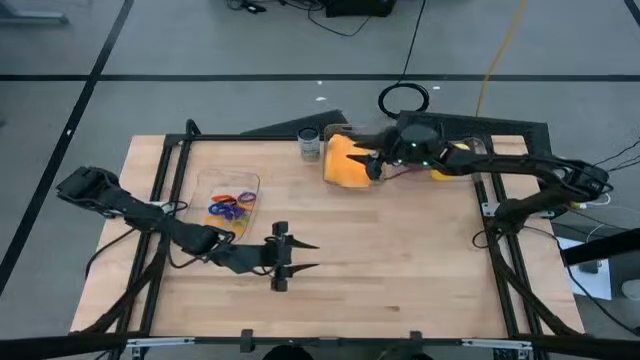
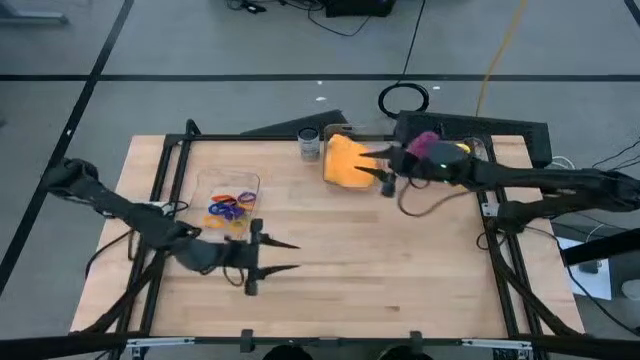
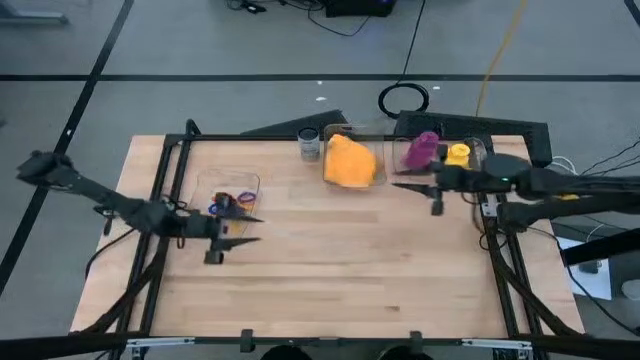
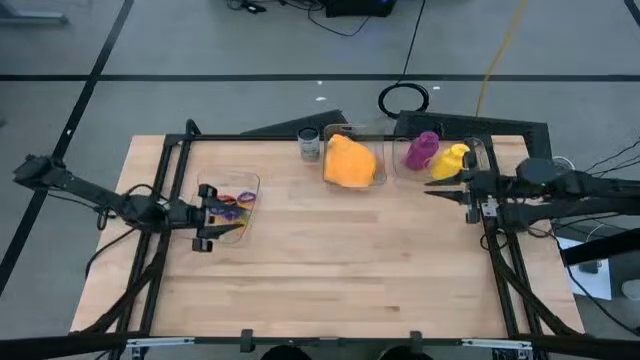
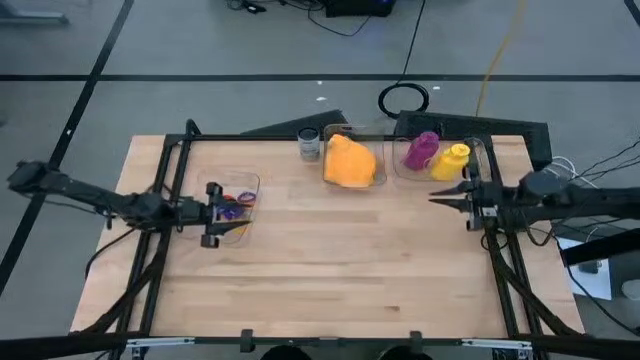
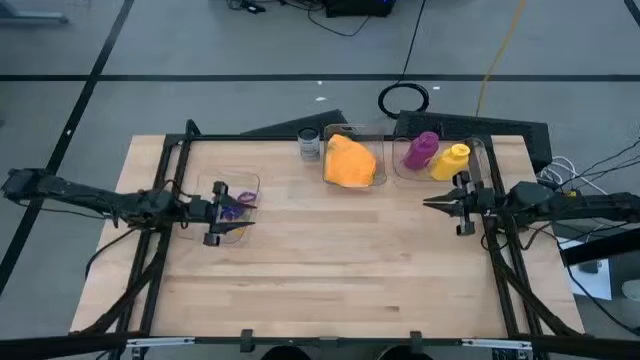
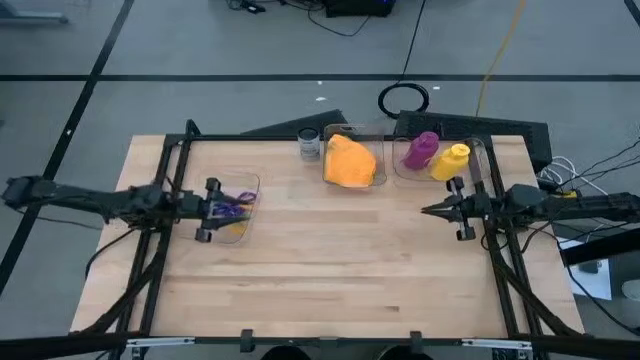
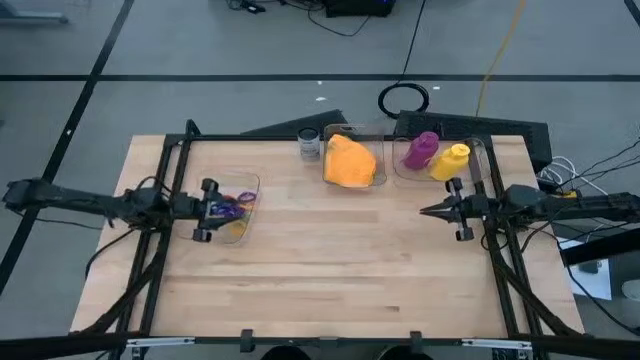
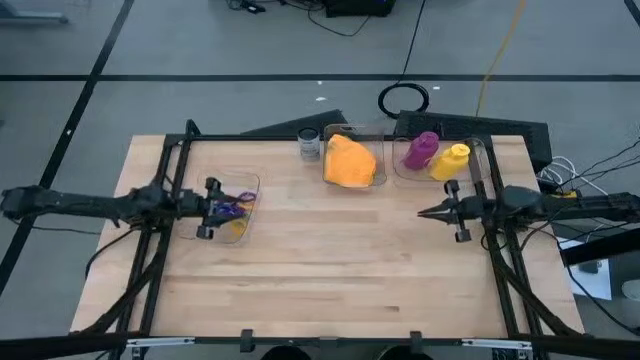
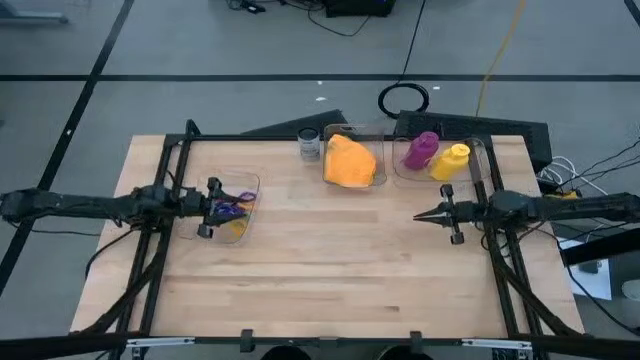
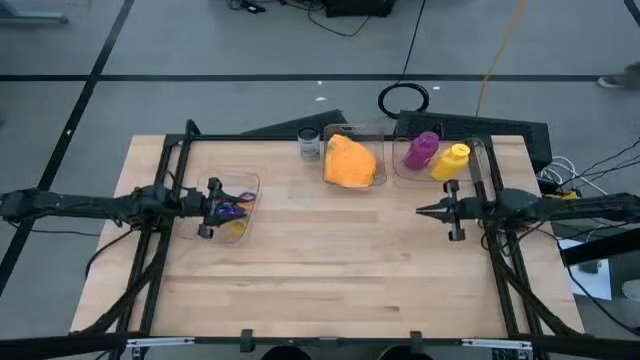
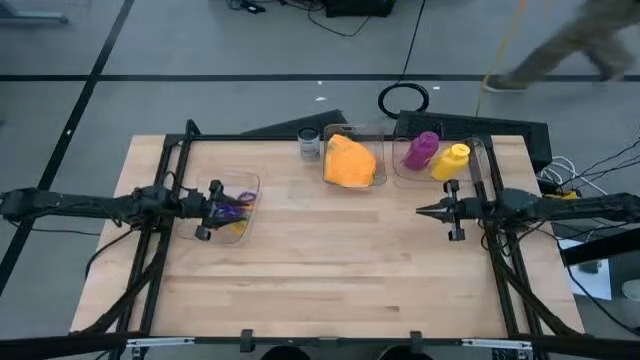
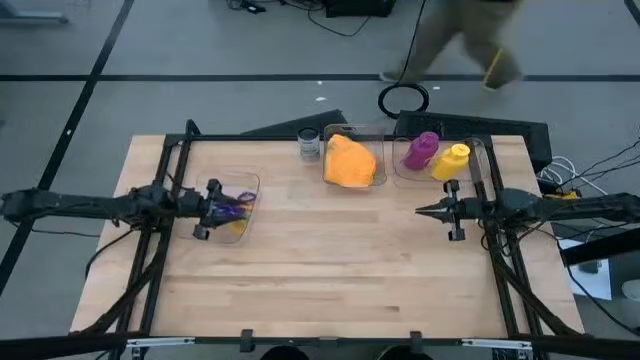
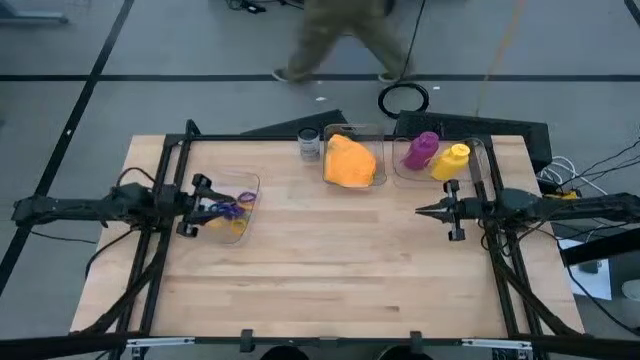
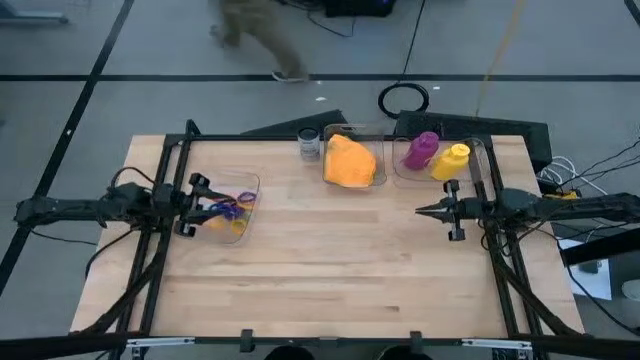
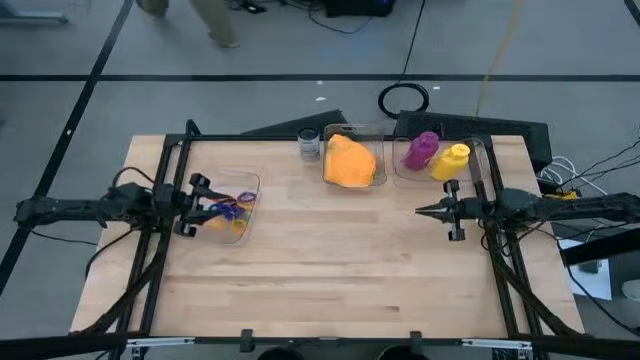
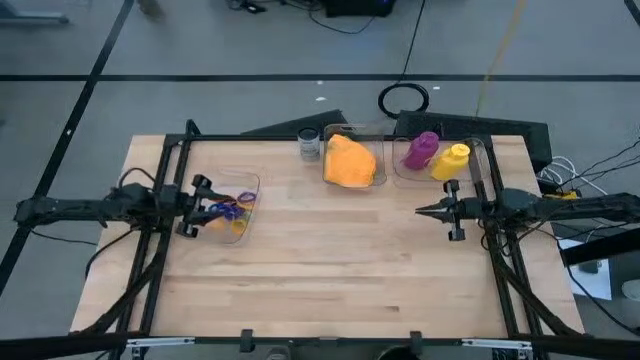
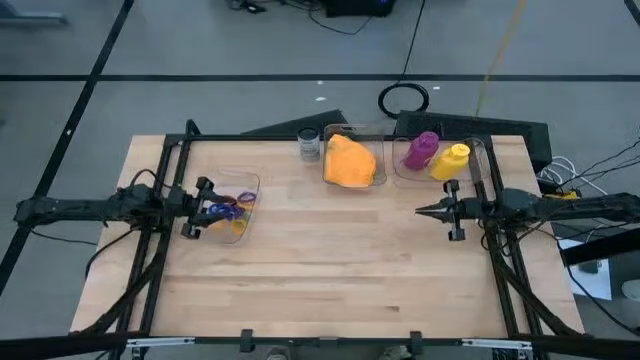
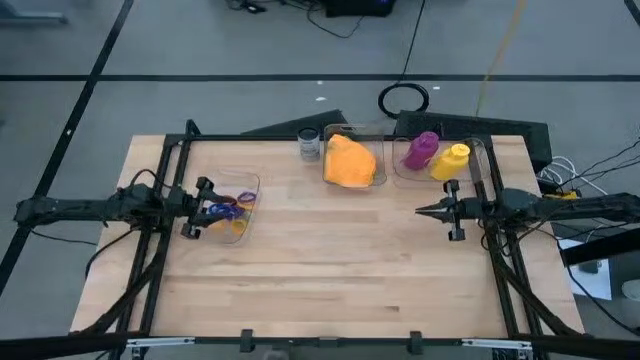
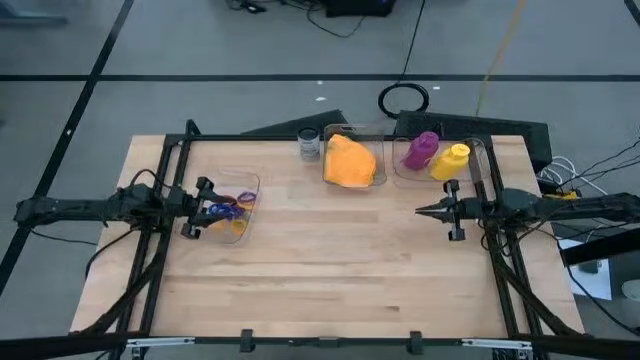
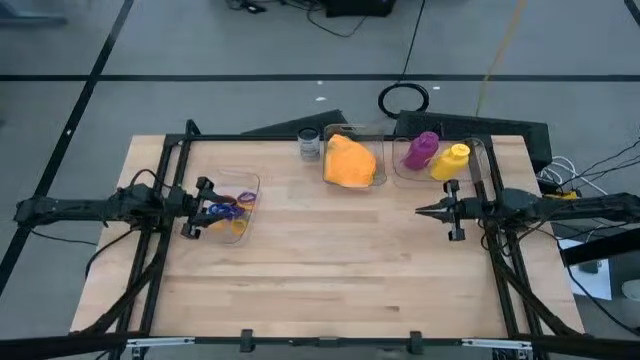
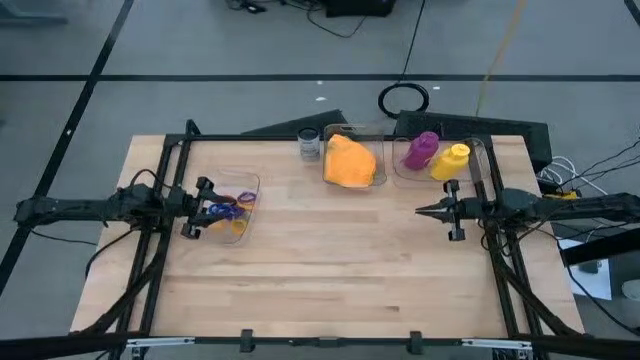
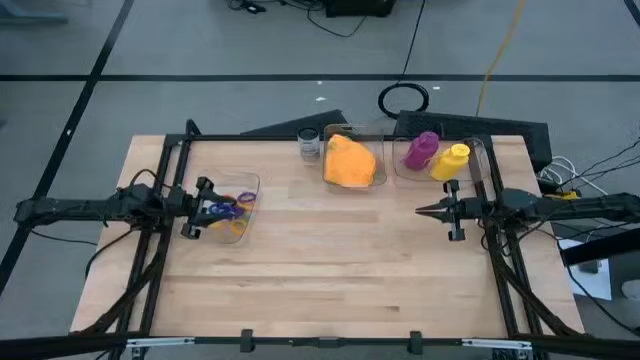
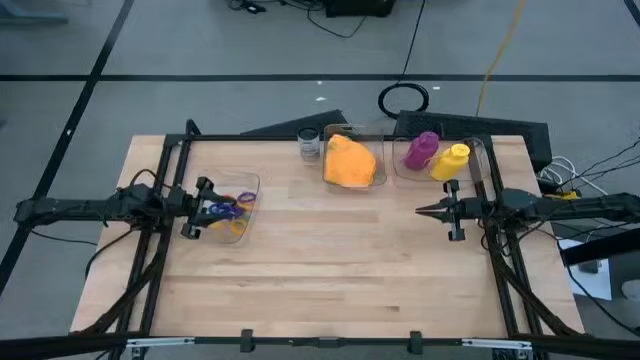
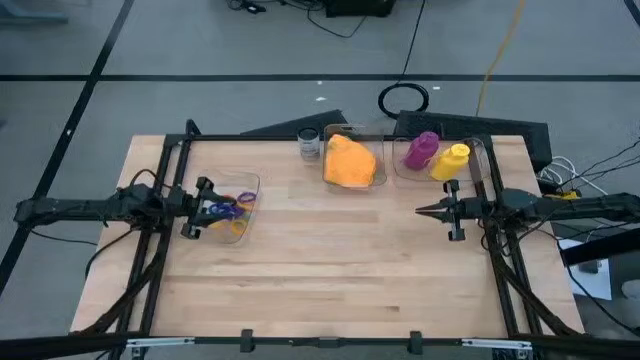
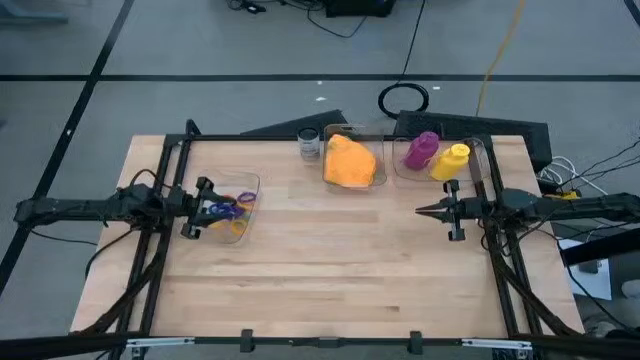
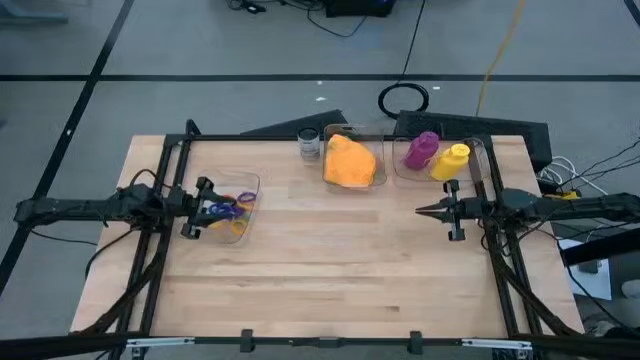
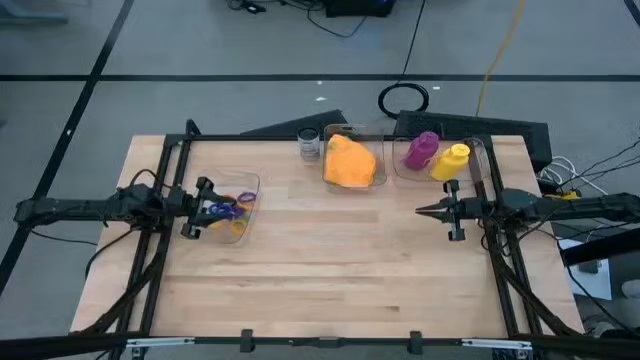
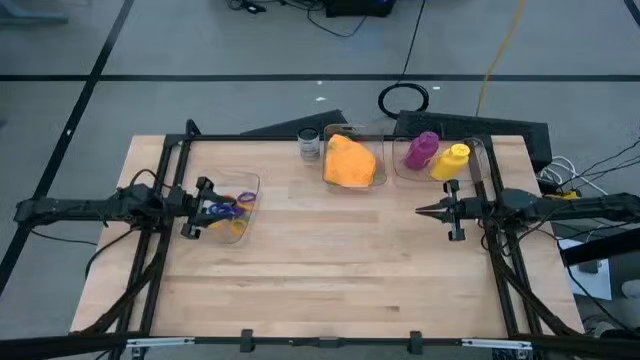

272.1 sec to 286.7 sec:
Task: Pick & Place Sports Items
Return to Home Position
